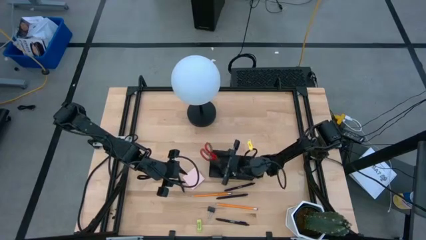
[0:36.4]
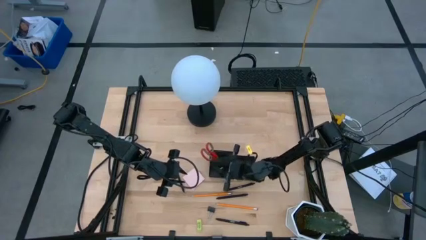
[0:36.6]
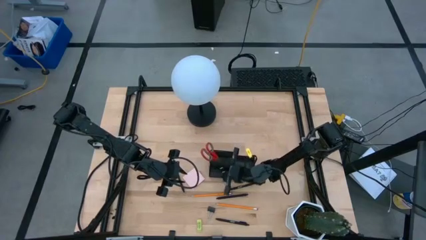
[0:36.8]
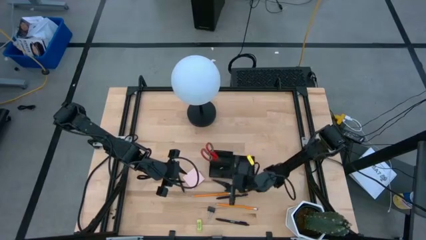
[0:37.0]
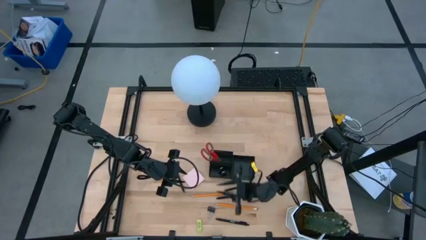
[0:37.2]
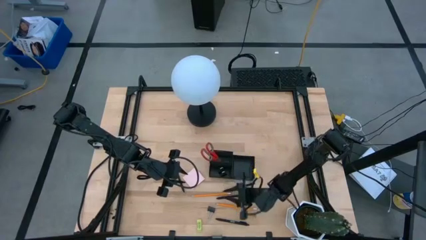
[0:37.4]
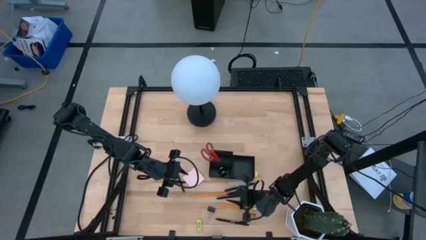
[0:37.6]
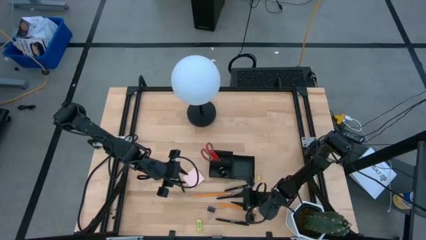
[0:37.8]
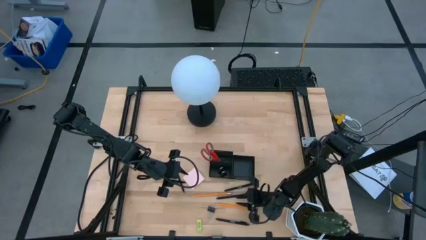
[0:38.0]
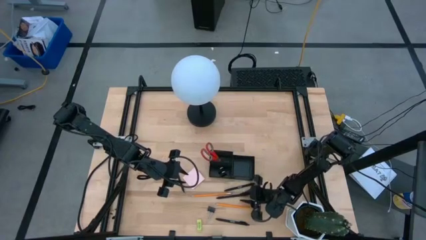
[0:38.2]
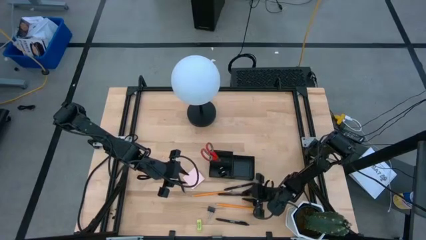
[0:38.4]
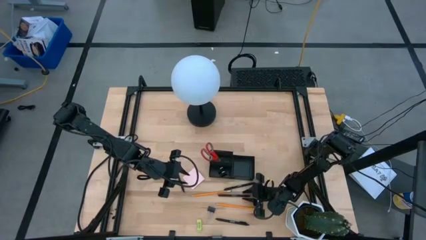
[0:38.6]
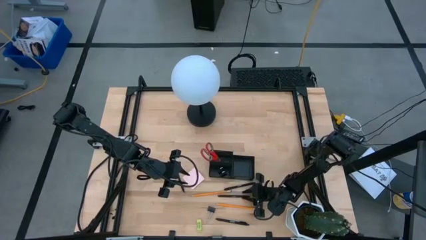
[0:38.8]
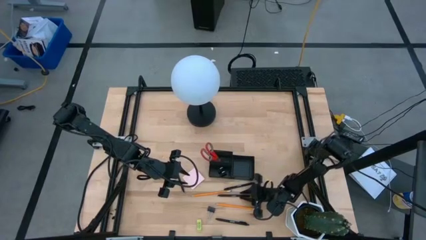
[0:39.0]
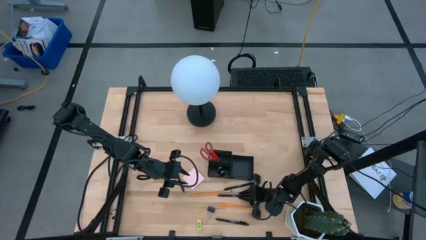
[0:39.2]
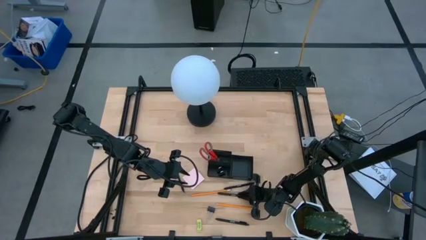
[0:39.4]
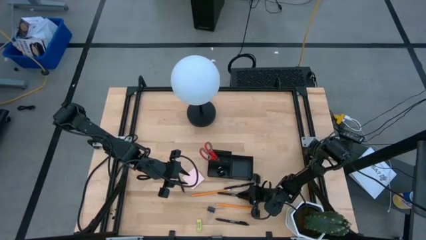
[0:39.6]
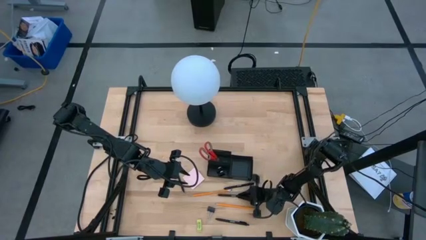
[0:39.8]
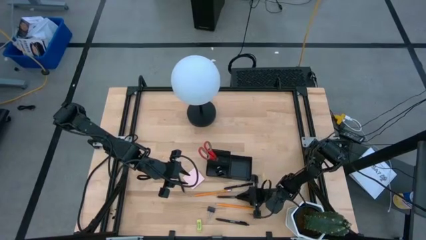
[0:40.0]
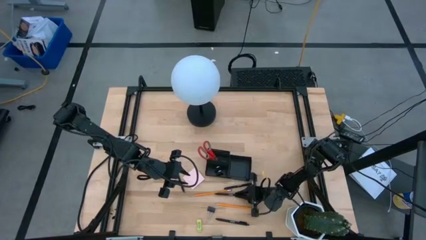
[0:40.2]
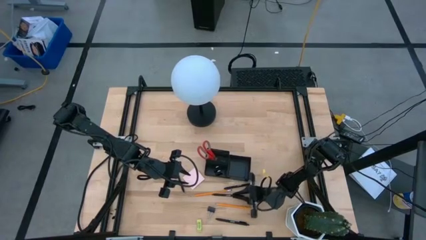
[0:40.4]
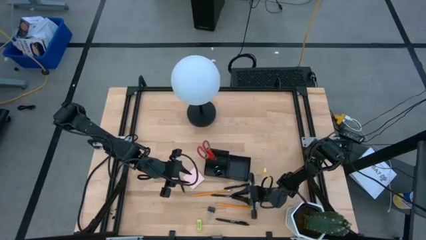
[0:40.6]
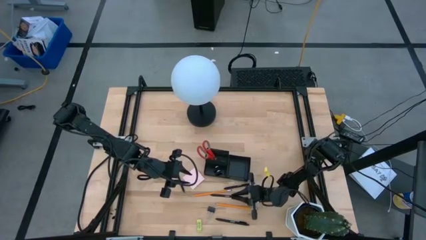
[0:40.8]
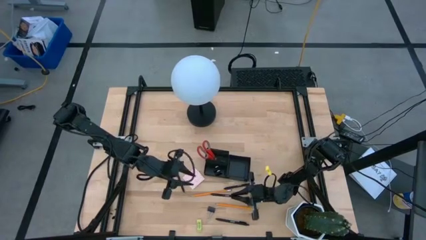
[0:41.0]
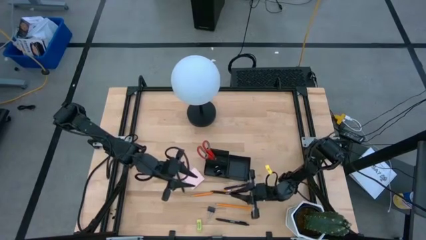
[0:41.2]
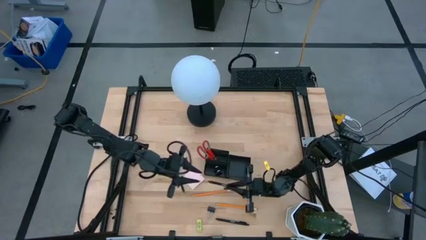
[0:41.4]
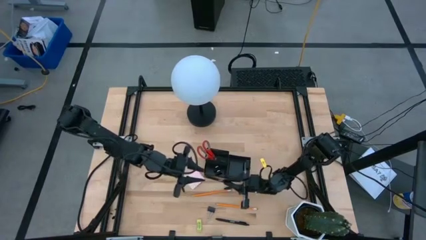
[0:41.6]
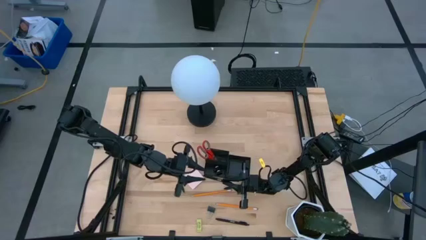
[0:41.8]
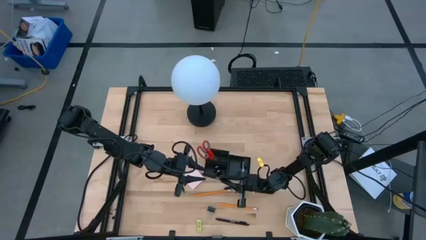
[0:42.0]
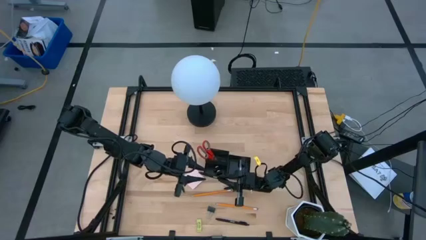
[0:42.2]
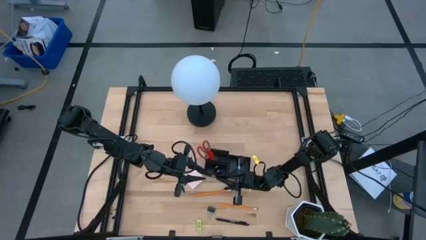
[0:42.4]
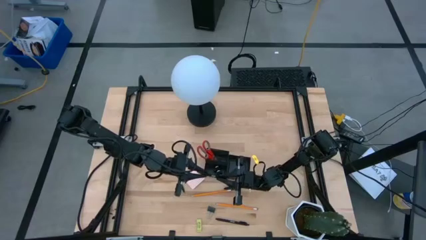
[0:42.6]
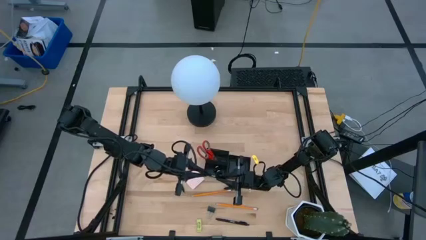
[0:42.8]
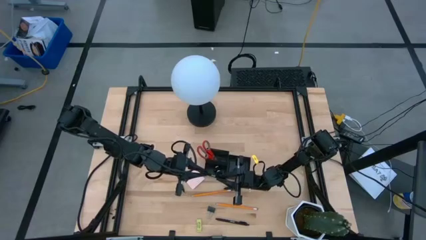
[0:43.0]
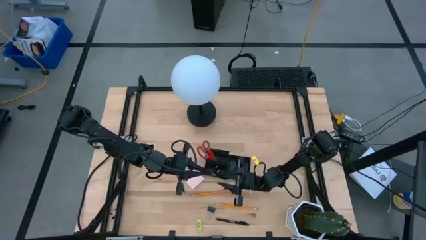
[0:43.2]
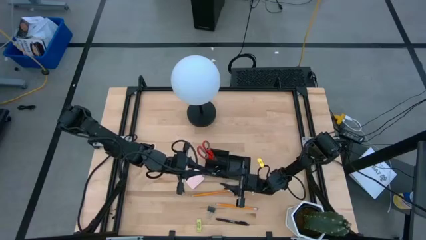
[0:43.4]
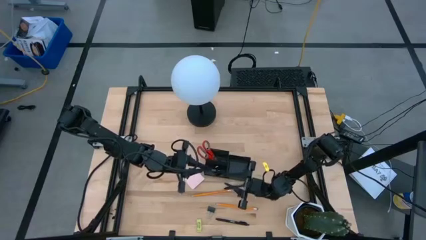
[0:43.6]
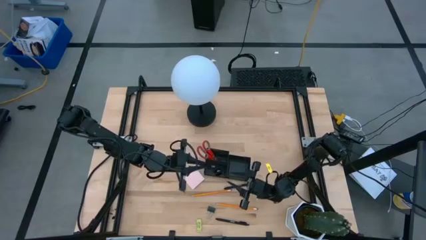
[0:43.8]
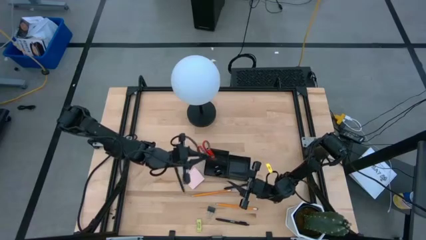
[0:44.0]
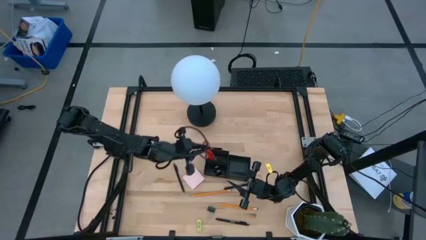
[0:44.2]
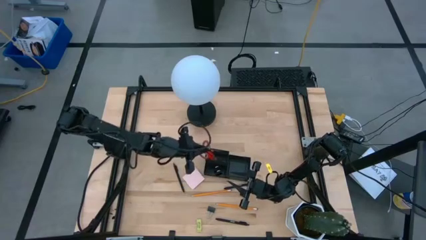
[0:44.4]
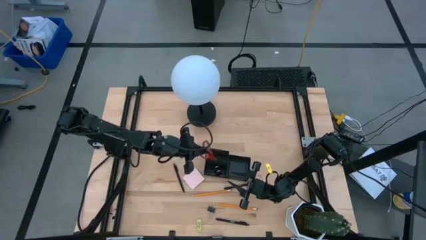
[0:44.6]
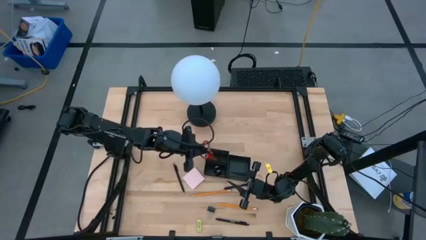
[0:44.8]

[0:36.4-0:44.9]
Task: Pick and place office supplies into organizer
Put the black pen into the desk organizer

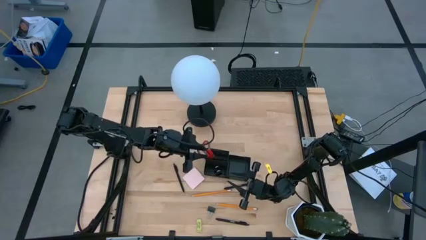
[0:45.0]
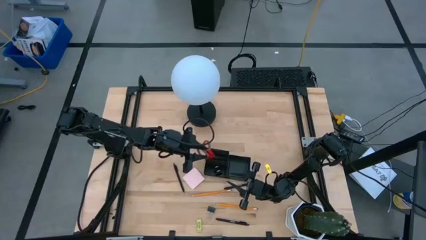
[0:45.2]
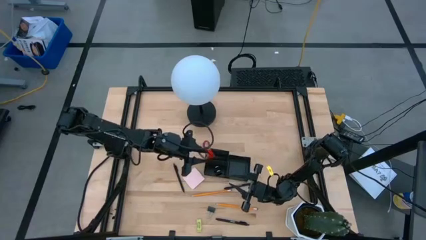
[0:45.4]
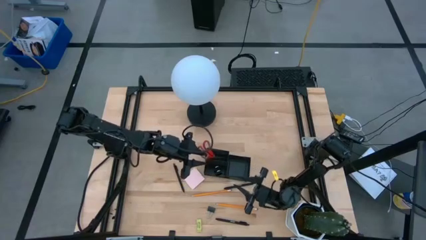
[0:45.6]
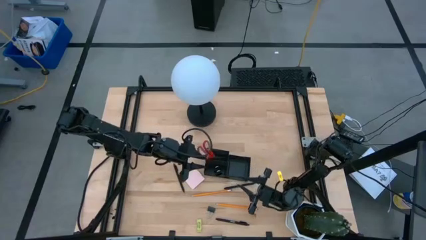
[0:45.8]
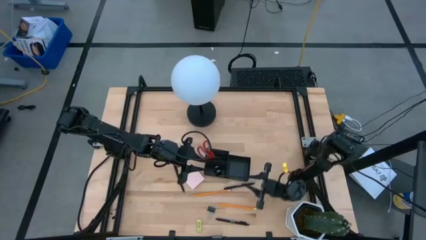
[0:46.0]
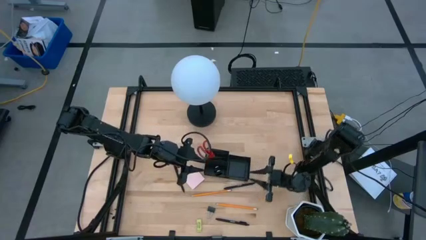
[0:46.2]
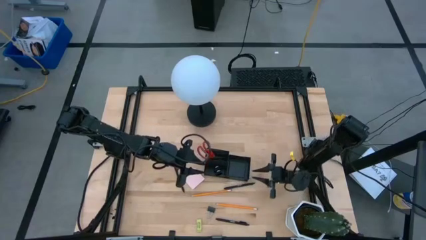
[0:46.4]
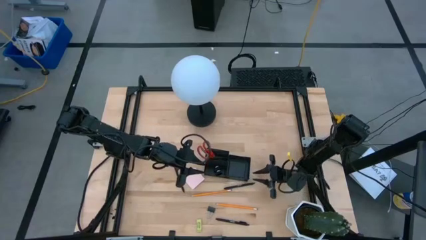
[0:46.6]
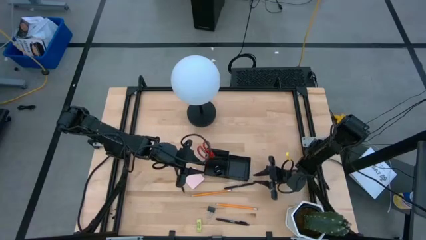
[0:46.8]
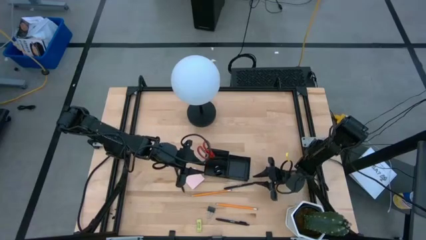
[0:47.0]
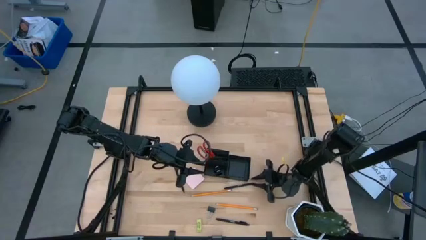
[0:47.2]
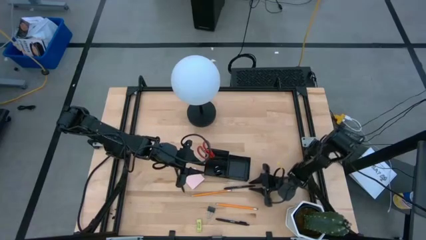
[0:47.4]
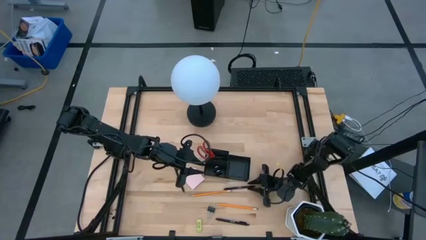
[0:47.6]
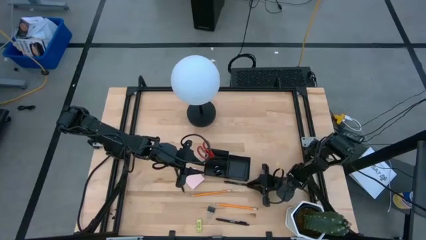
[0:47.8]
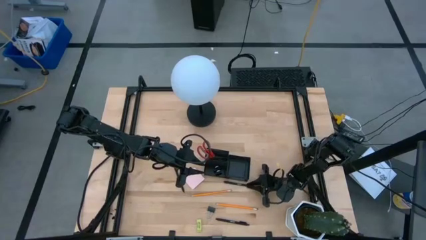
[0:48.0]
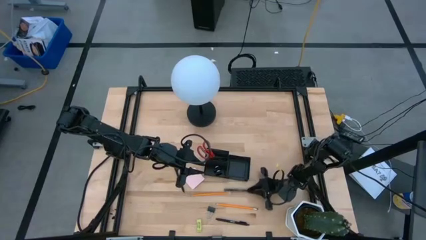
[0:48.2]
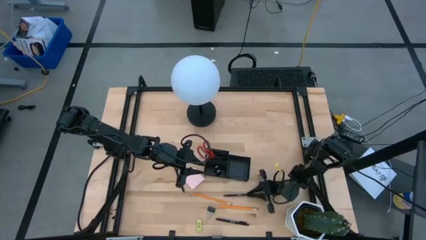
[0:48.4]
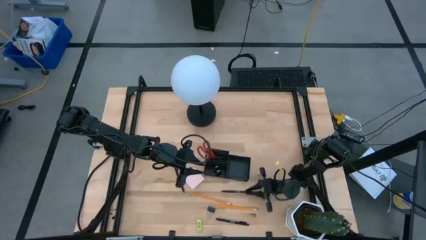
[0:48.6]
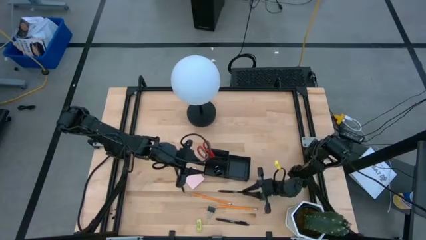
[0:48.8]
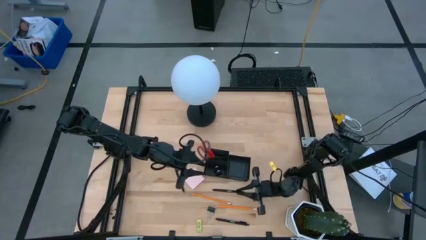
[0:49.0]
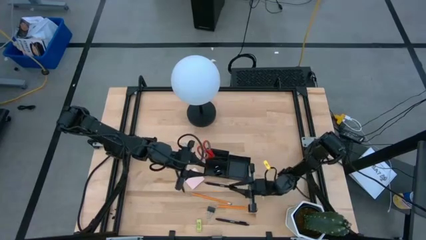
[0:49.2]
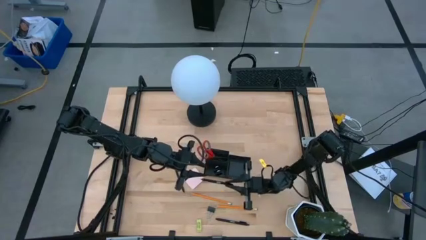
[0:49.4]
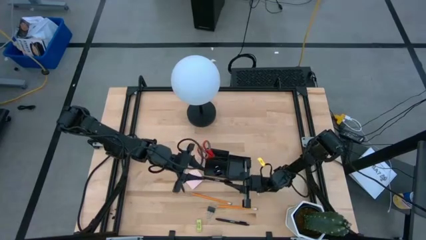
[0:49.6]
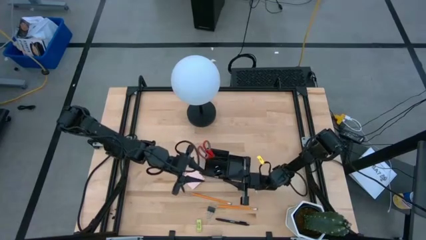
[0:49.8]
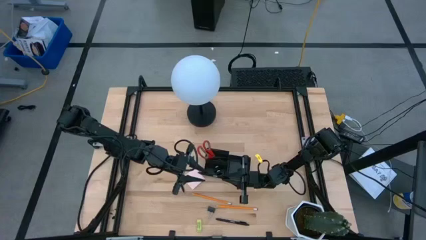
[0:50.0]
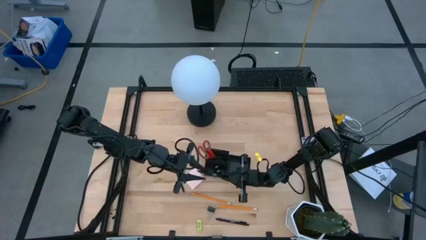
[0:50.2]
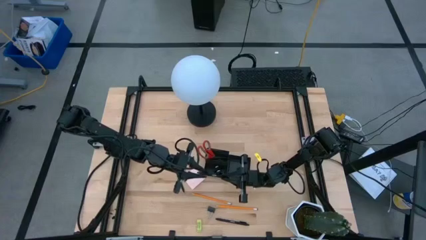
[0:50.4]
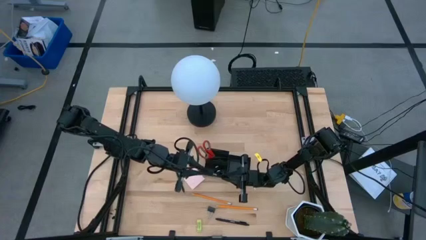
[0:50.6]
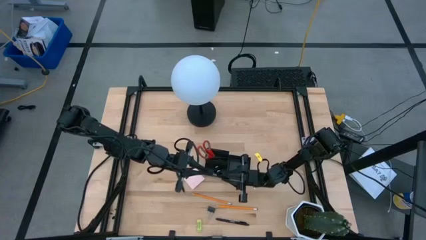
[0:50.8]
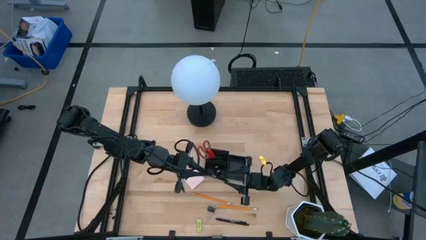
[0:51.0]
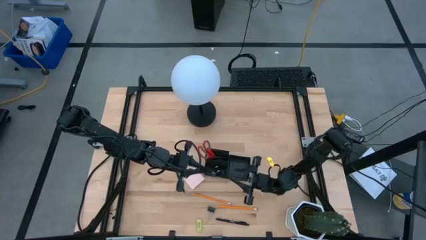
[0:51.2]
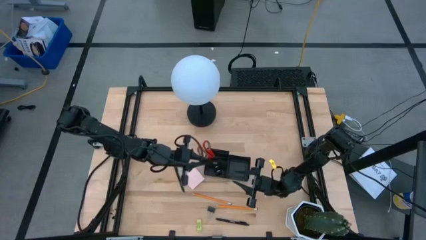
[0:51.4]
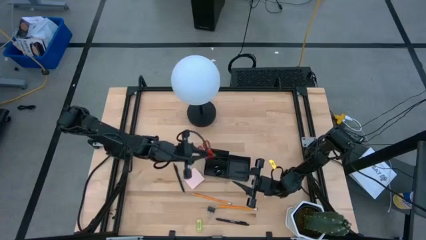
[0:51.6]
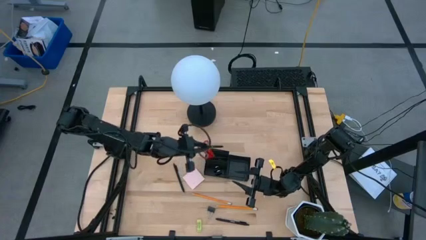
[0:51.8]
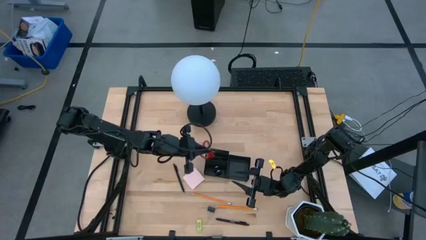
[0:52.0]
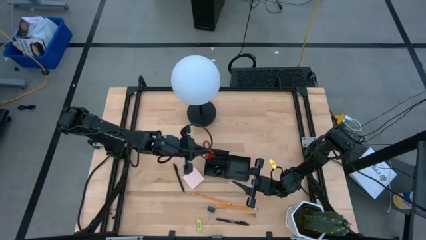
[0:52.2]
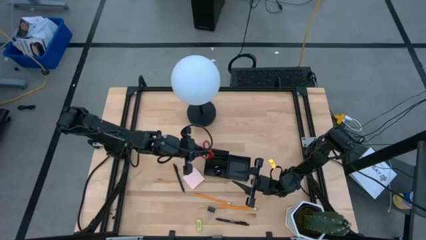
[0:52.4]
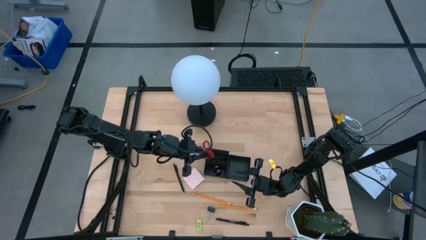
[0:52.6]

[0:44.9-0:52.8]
Put the black pen into the desk organizer
